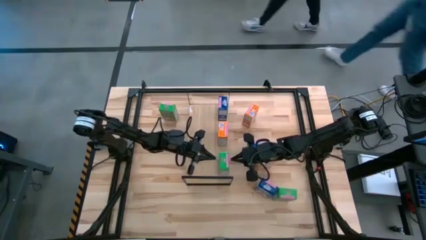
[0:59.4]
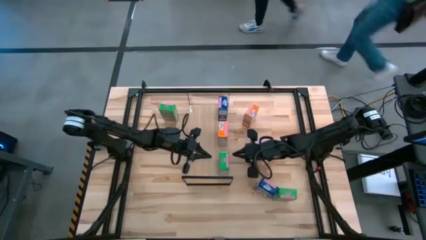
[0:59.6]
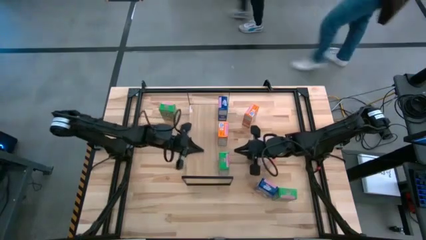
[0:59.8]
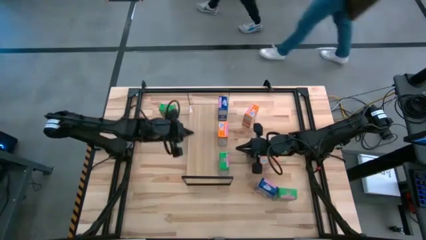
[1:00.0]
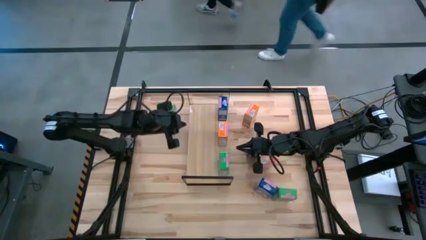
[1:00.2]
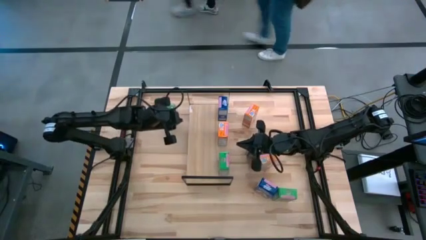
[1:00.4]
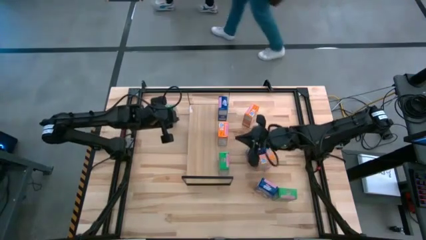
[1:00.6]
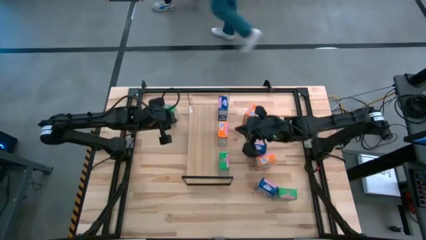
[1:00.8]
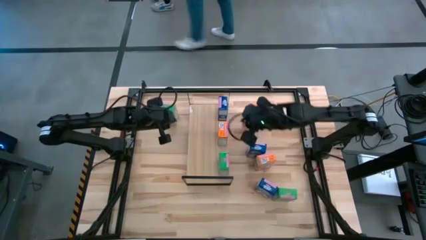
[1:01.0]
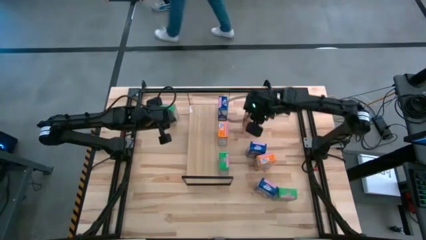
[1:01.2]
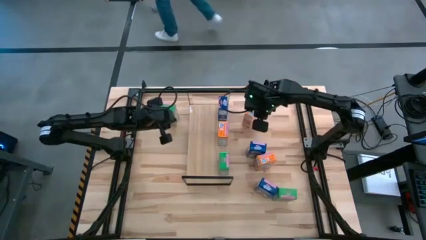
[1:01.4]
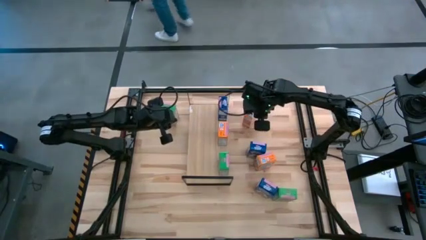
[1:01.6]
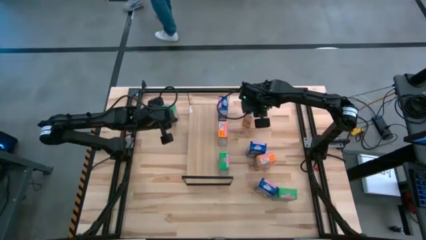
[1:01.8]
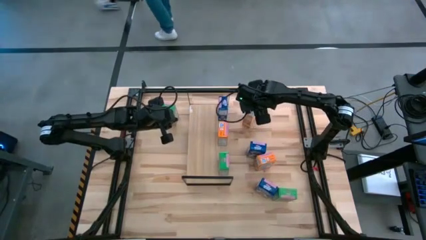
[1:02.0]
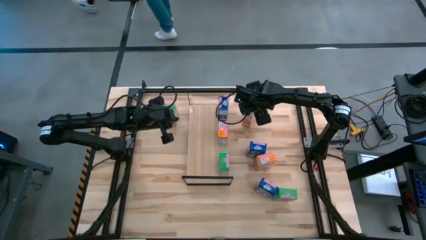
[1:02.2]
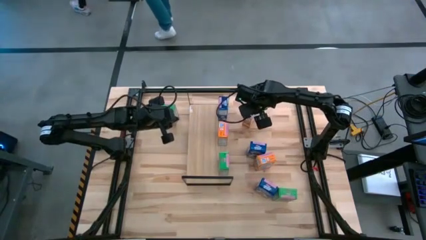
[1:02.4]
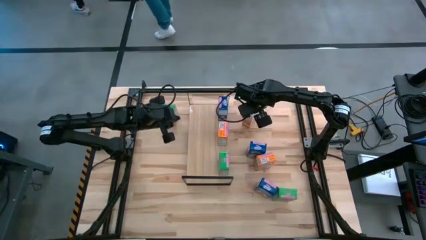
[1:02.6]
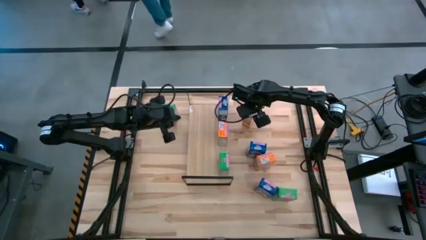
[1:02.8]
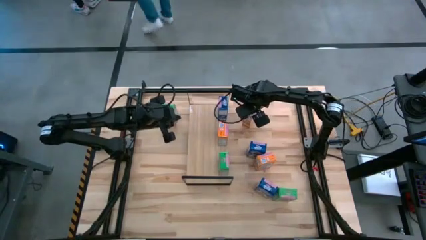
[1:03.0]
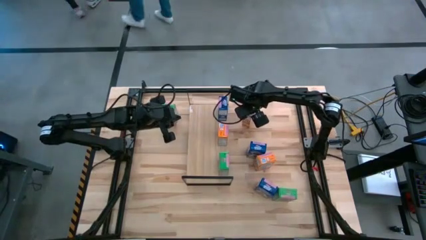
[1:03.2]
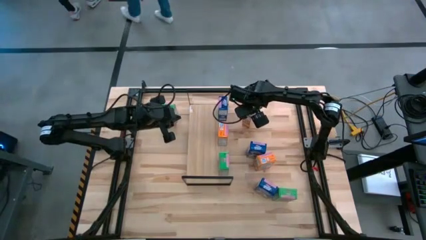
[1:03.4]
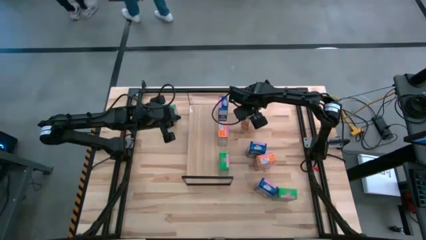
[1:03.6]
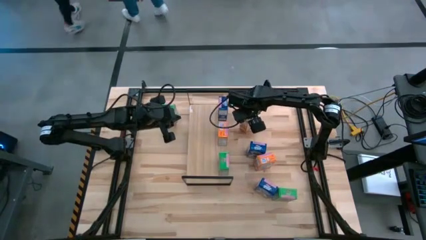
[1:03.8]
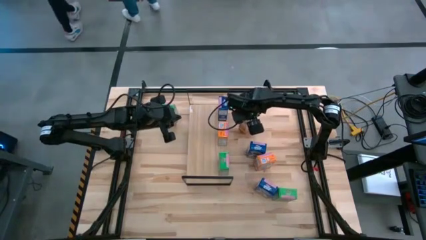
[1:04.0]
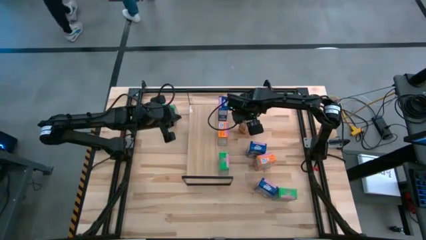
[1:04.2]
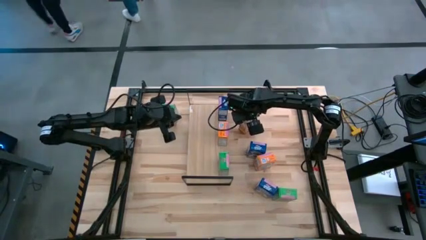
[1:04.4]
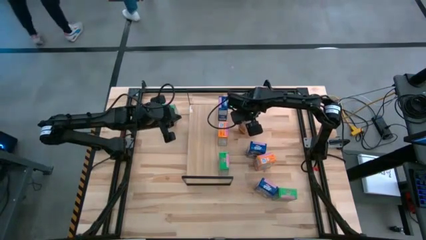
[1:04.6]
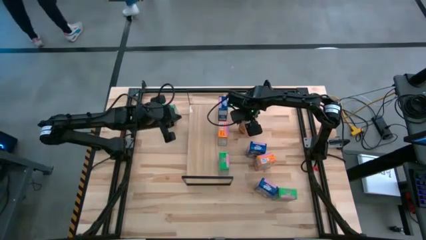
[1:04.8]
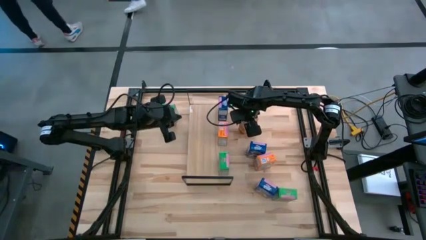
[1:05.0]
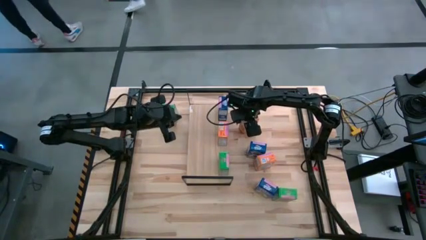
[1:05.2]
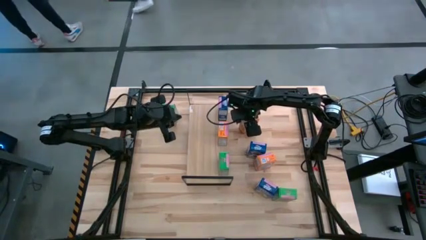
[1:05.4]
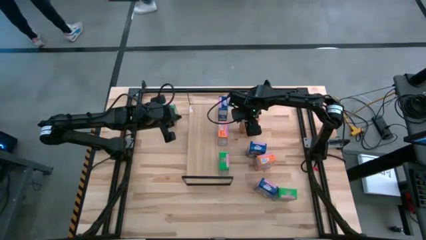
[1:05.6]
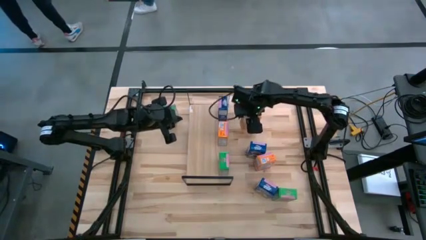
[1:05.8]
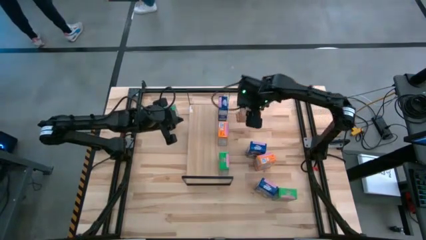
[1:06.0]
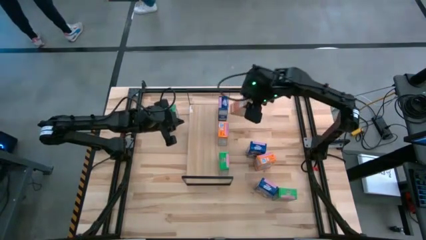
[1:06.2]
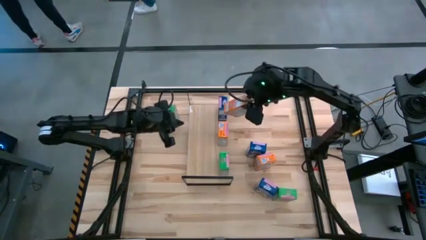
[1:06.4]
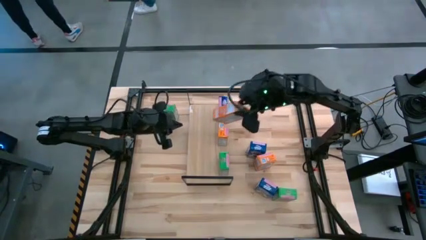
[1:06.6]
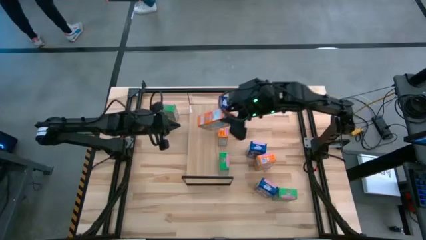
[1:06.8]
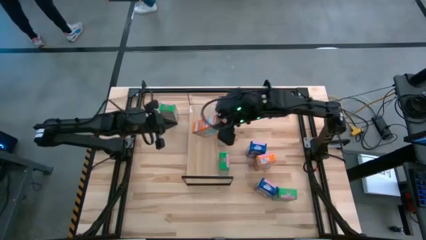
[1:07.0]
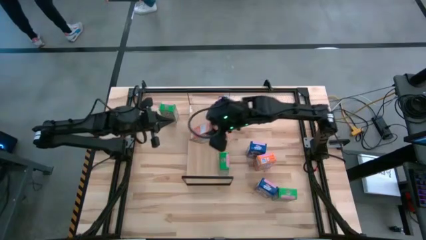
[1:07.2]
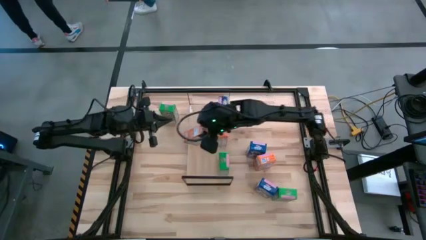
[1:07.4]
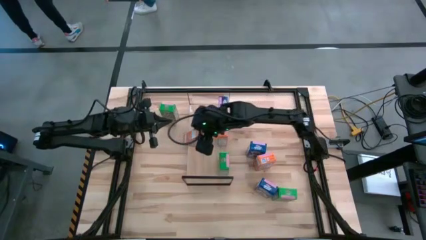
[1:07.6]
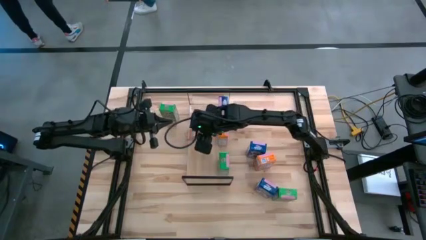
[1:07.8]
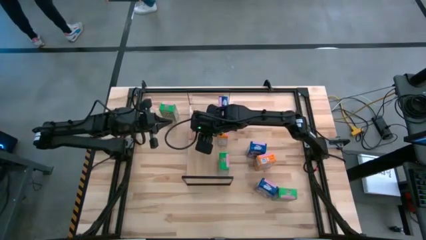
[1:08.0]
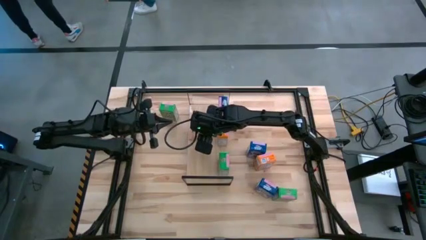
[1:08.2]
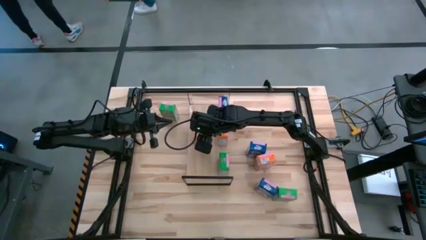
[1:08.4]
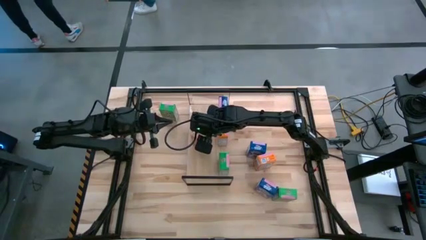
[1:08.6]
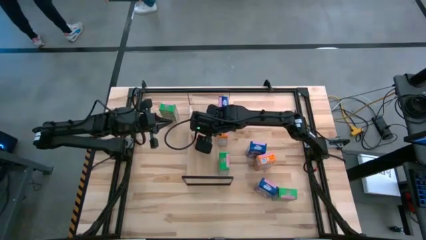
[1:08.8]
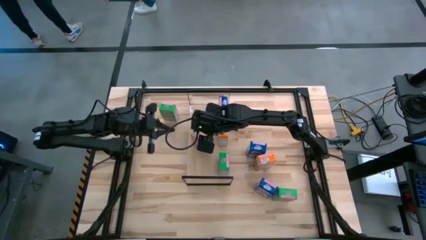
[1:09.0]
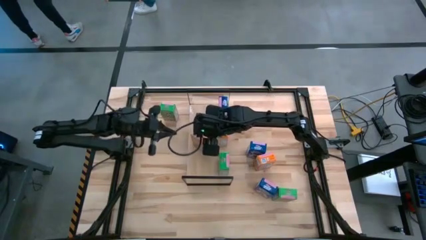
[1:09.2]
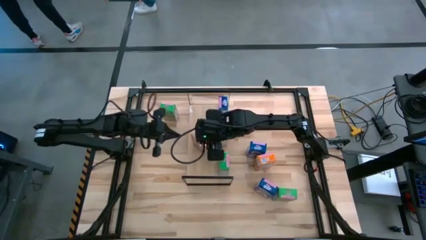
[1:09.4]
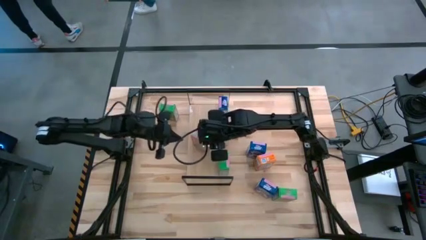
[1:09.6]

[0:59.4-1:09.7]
Task: Stack cereal on shelf
Put the top orange cereal box on the shelf aligned with the other orange cereal box

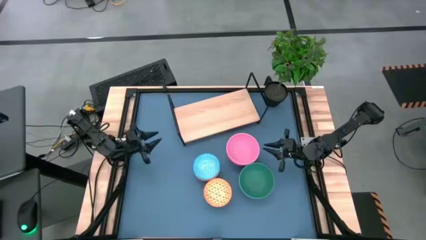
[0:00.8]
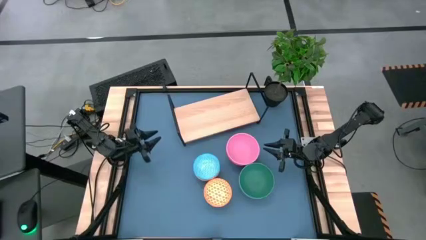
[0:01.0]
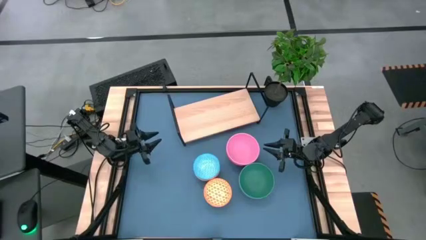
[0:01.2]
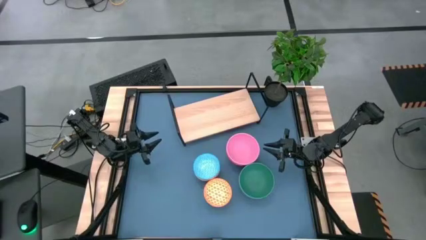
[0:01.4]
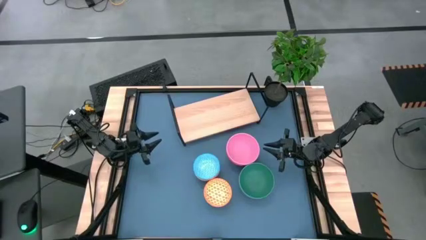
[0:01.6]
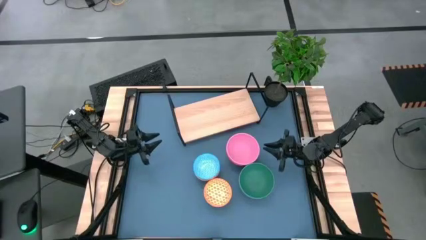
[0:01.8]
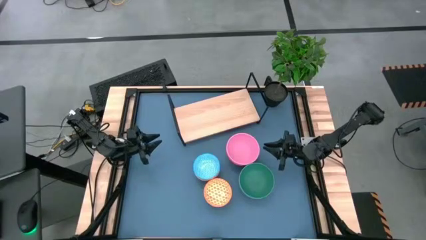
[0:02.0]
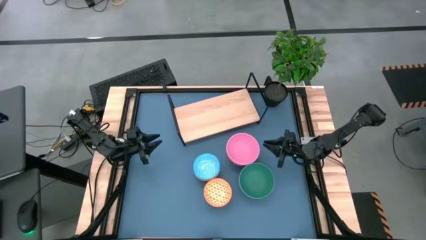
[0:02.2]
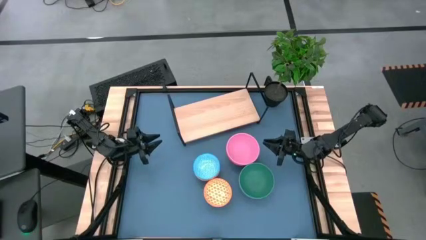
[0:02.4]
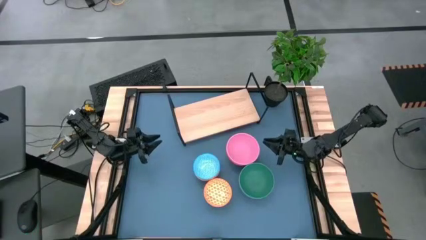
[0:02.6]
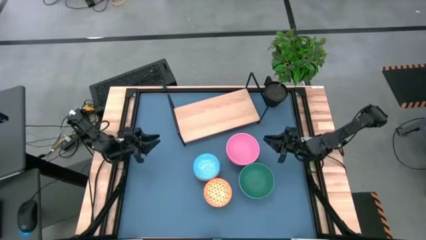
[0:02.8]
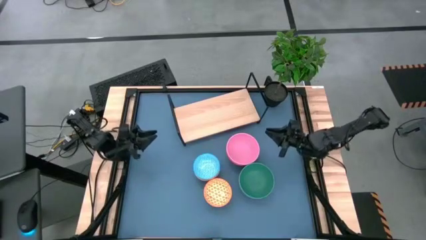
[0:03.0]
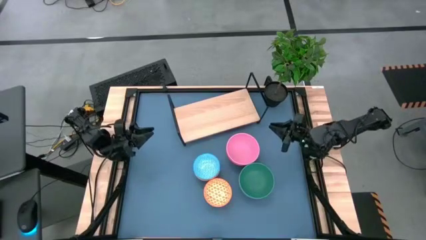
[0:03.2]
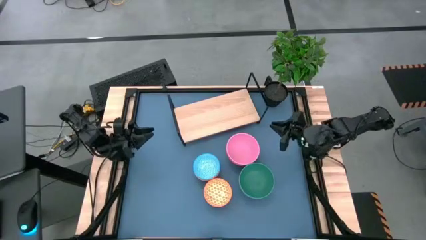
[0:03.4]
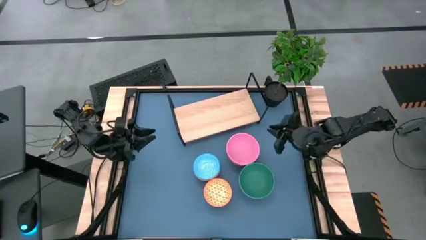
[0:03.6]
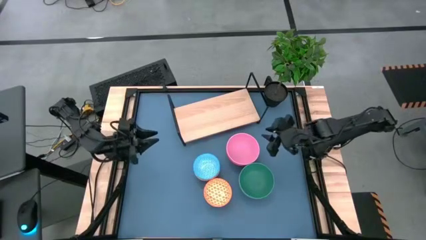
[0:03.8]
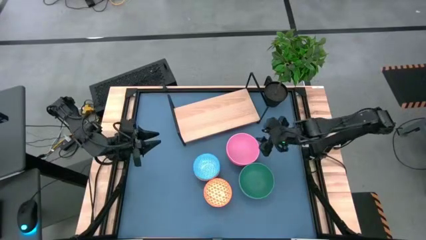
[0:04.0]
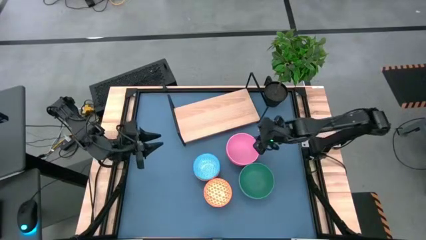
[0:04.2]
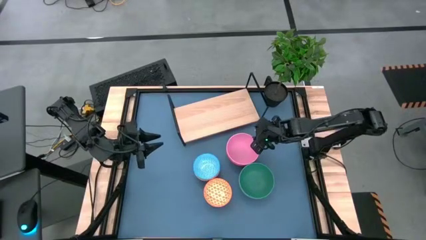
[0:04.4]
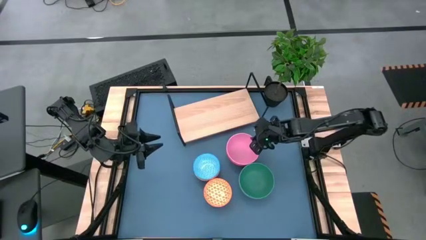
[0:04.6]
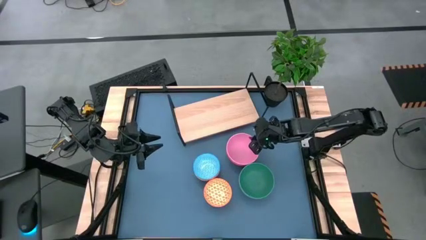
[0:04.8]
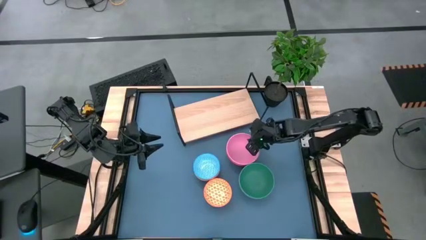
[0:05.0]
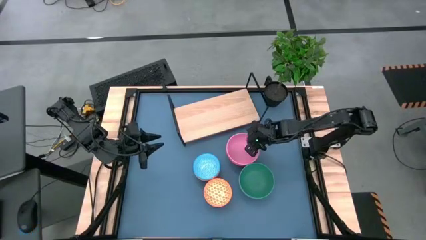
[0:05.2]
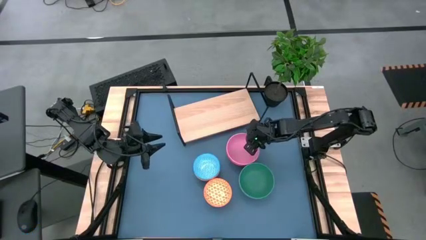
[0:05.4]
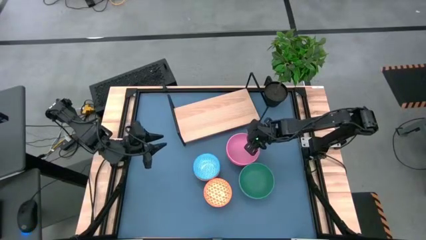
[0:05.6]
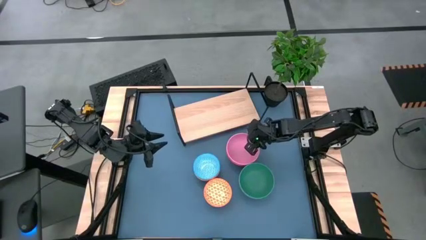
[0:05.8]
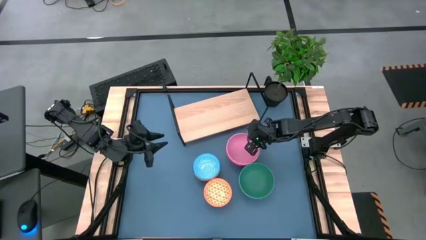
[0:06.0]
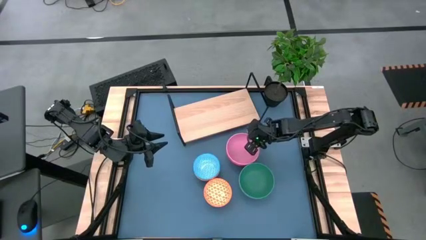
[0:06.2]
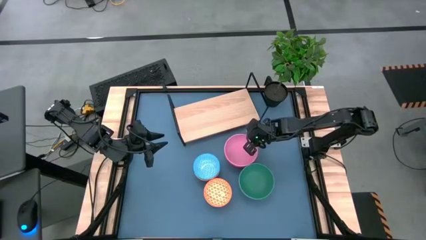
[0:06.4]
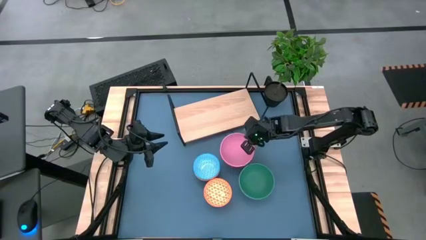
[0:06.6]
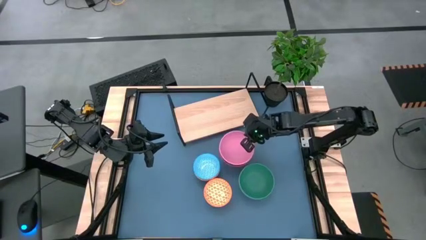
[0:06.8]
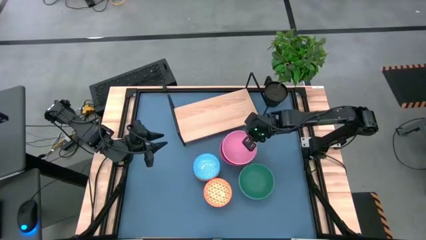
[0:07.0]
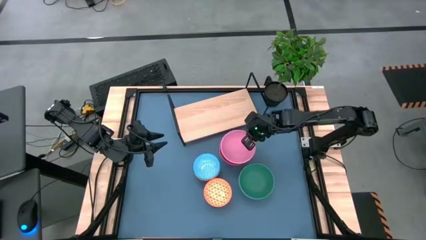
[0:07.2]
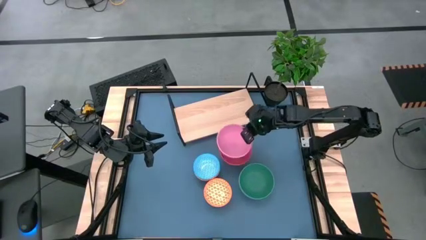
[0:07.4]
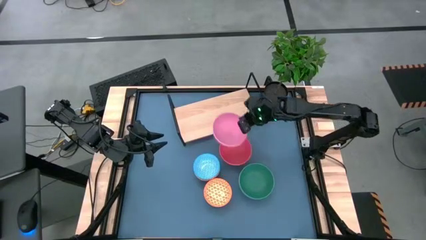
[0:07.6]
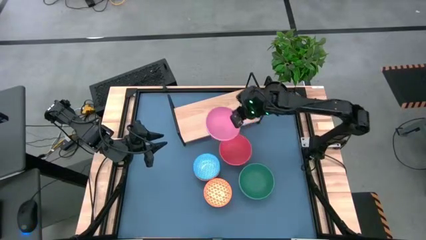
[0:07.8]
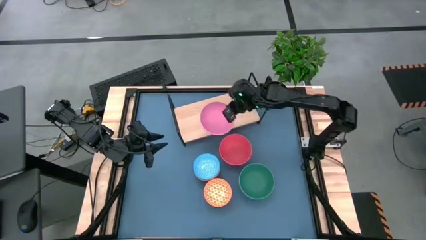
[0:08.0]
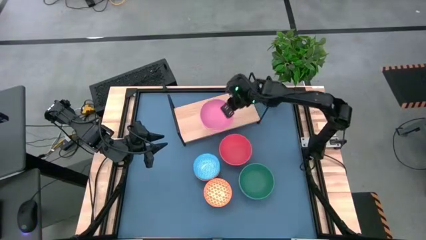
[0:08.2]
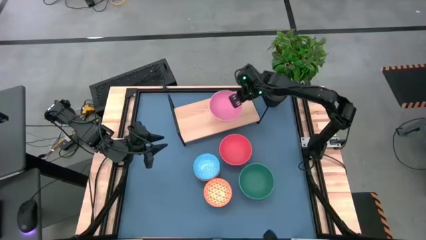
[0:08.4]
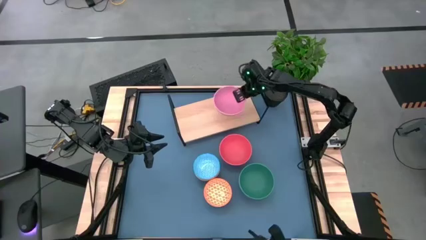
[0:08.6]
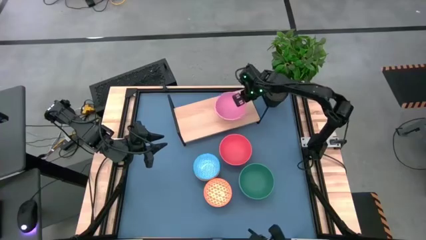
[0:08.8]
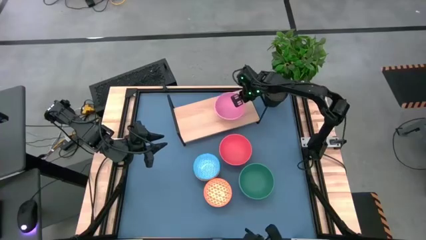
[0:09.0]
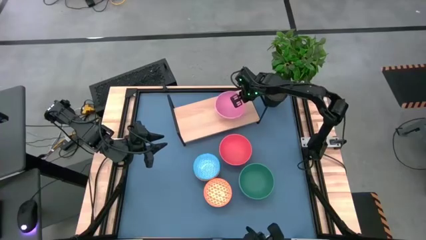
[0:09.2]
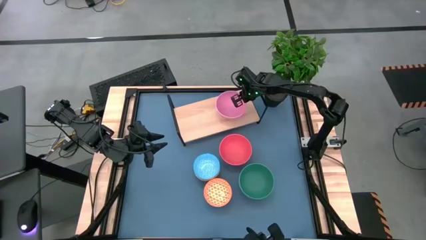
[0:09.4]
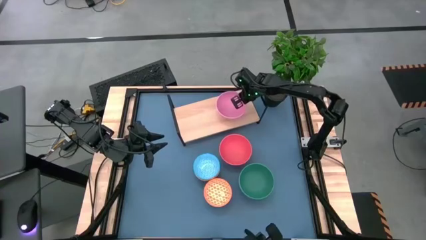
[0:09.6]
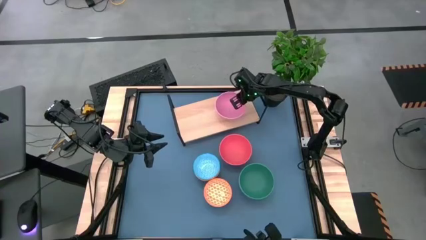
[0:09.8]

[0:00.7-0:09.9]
Task: Place and stack bowls onto a shelf
Put the pink bowl on the shelf
